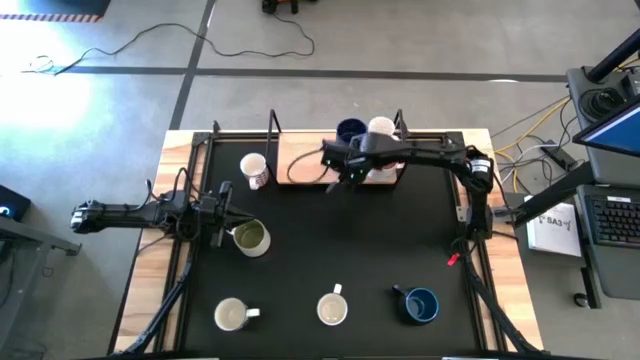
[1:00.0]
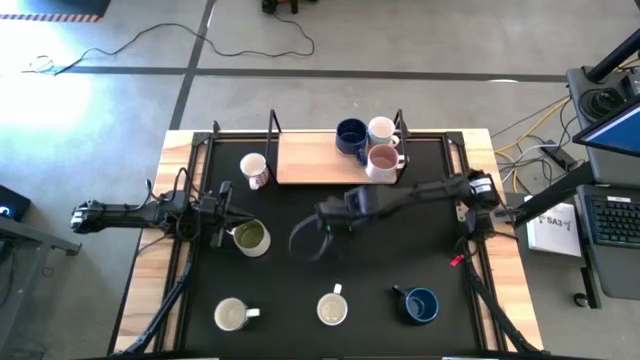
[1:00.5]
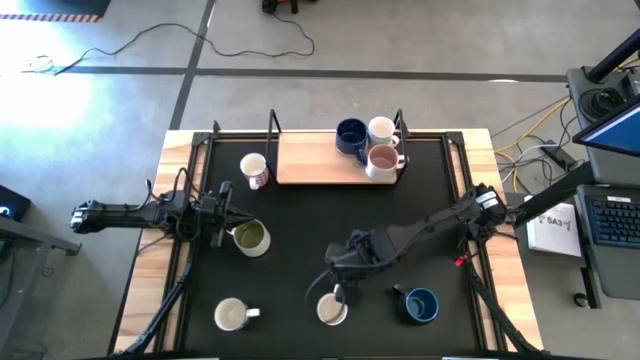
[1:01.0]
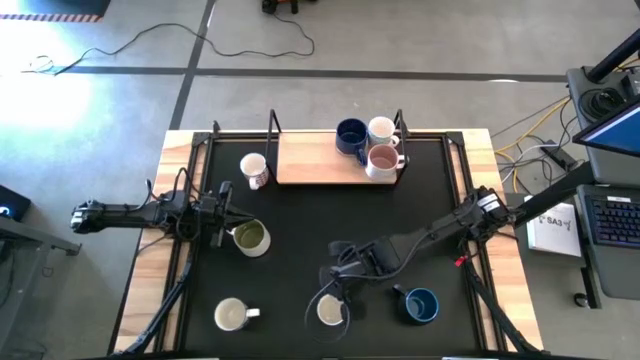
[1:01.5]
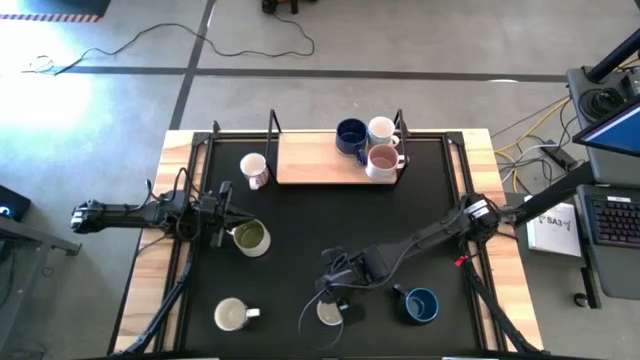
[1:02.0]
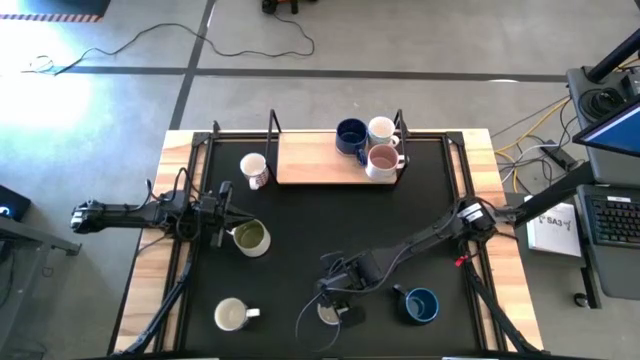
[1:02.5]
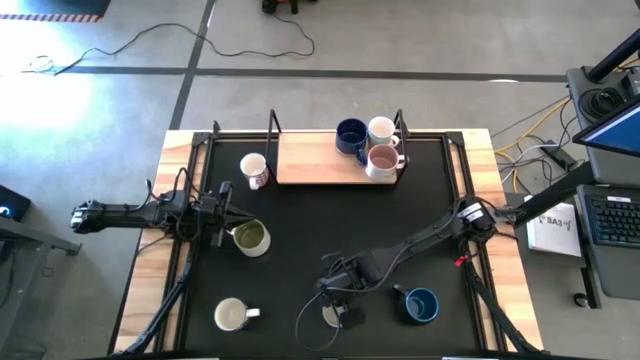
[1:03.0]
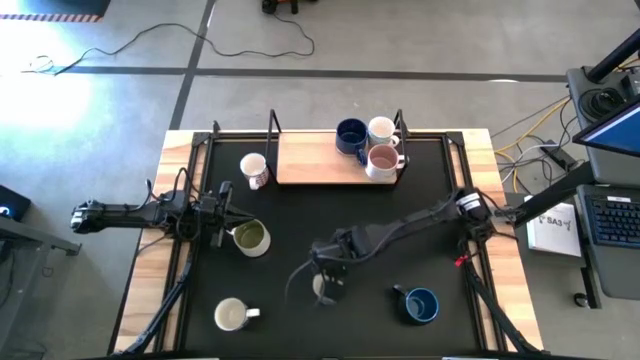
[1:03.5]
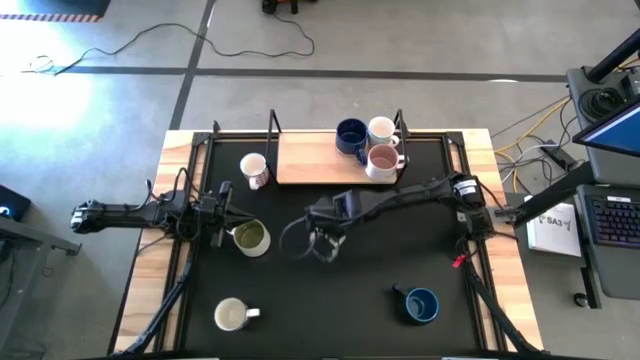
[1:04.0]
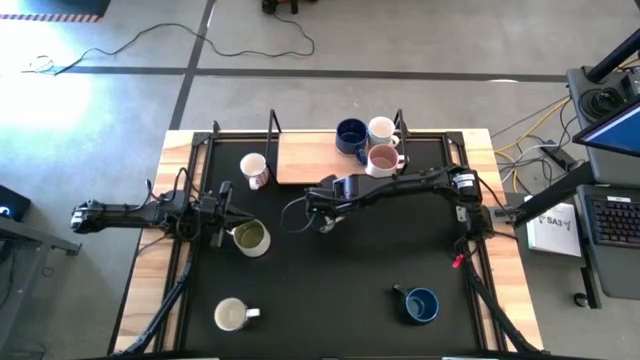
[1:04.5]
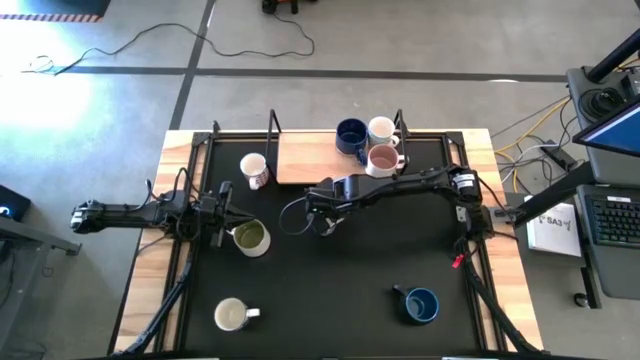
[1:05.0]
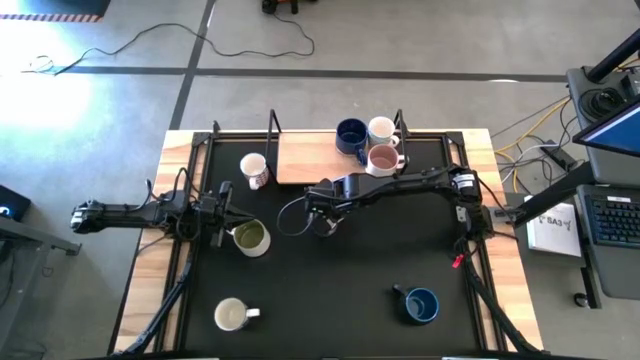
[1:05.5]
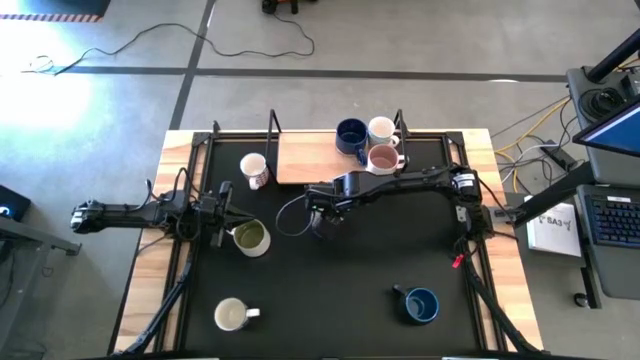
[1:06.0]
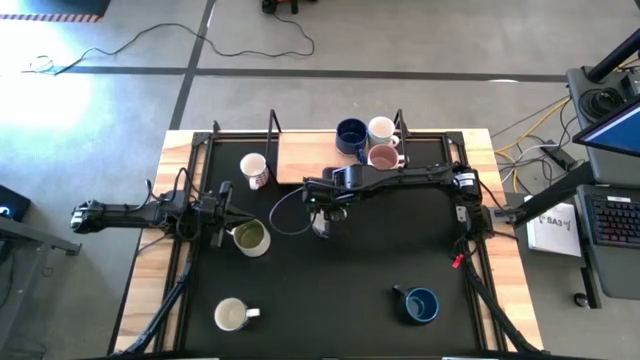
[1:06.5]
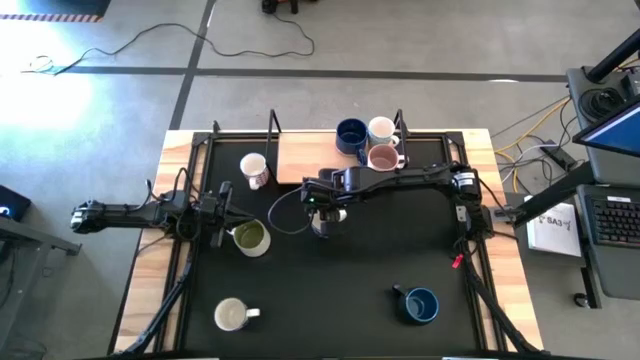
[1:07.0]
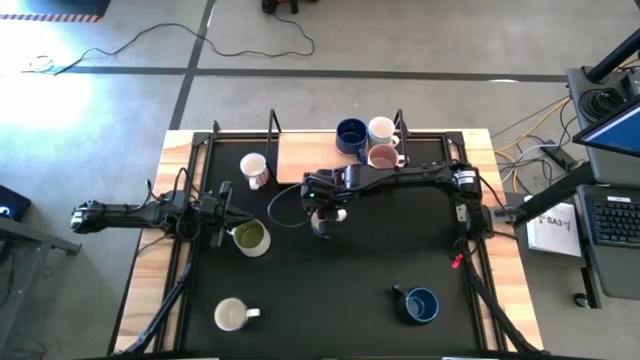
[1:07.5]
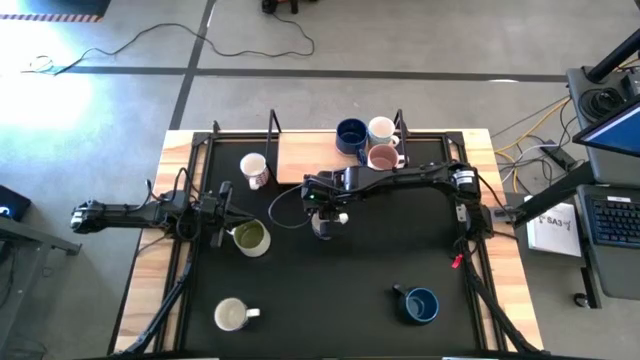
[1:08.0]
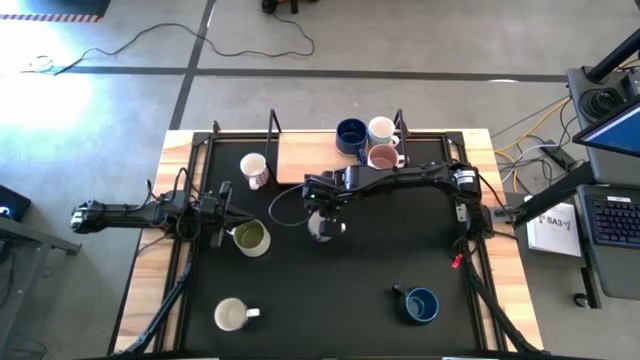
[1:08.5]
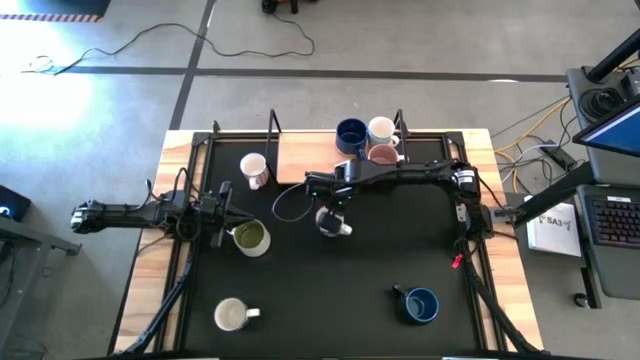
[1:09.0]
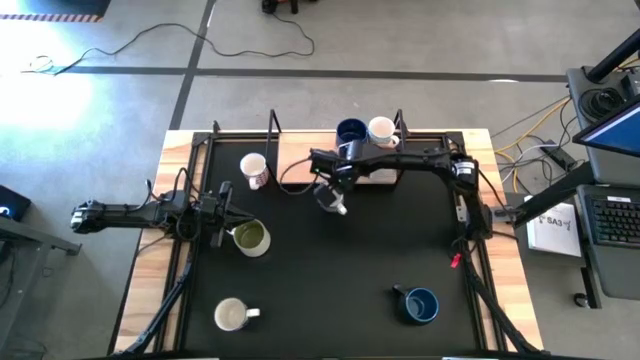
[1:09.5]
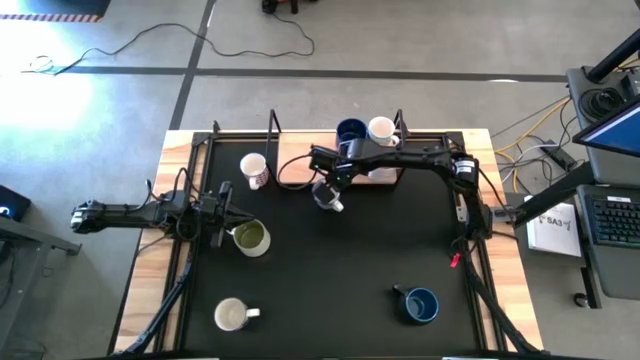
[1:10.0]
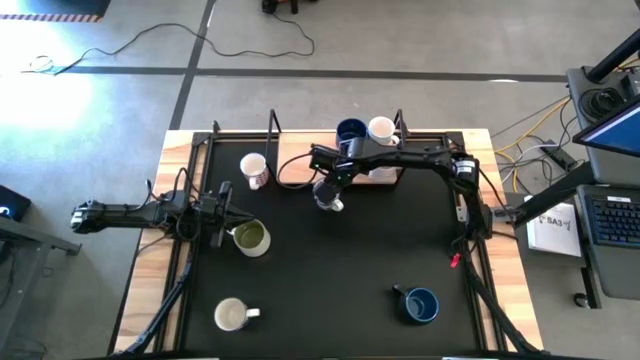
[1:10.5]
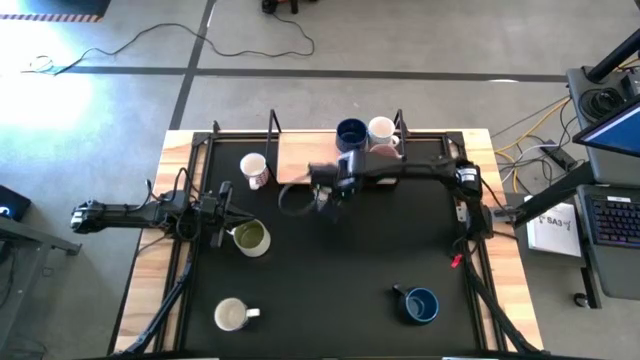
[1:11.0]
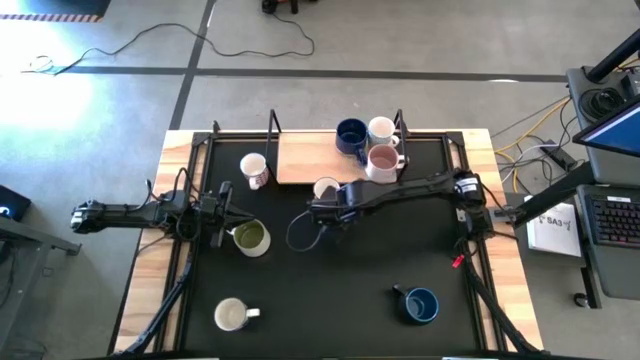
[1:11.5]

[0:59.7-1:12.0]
Task: Place coffee mugs
Put the right blue mug on the shelf aligned with the other dark blue mug

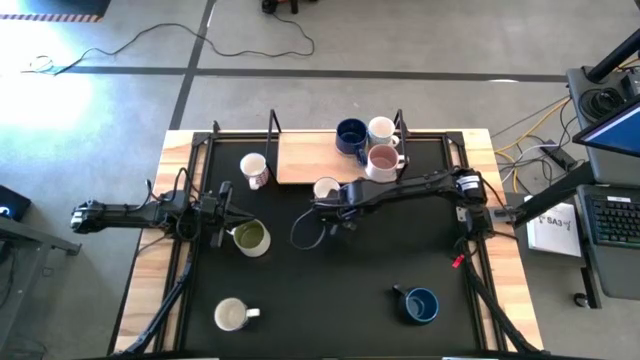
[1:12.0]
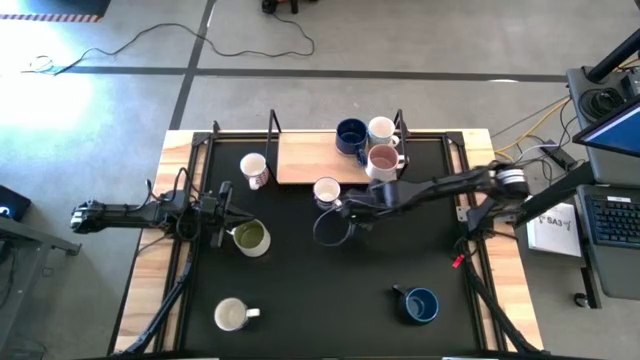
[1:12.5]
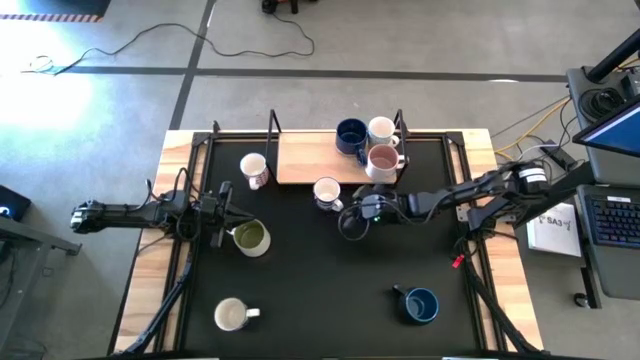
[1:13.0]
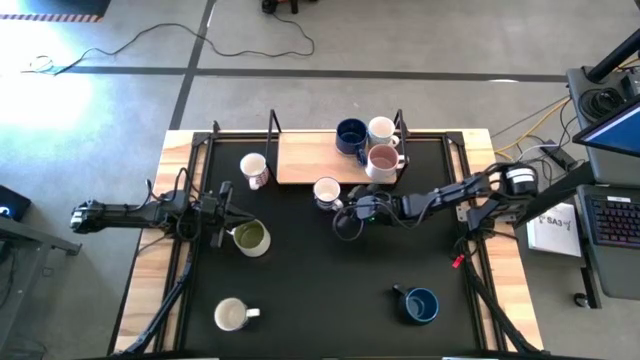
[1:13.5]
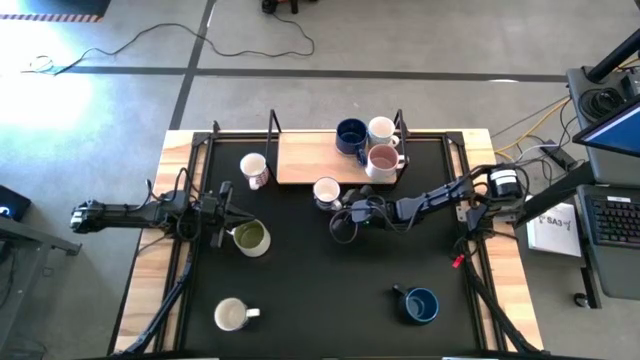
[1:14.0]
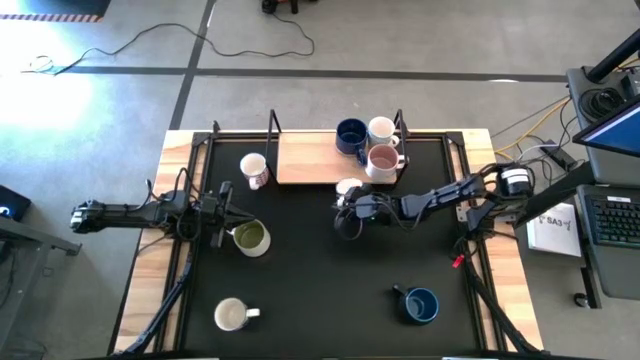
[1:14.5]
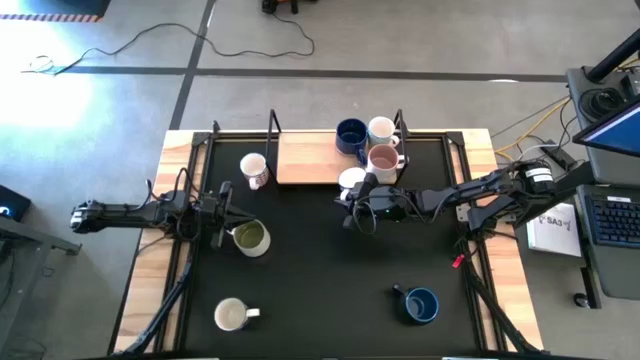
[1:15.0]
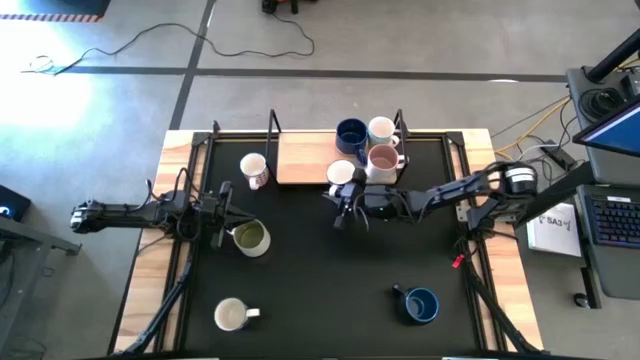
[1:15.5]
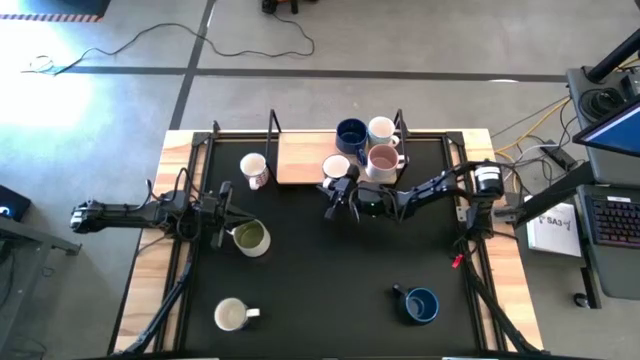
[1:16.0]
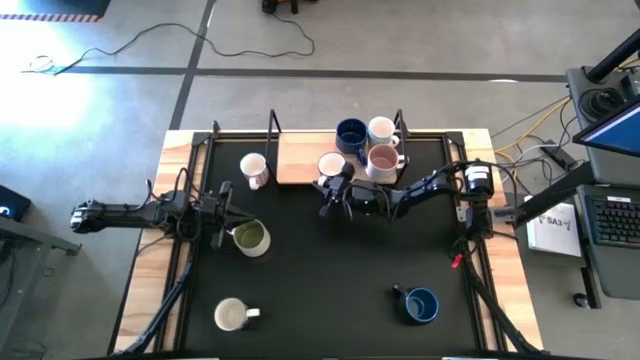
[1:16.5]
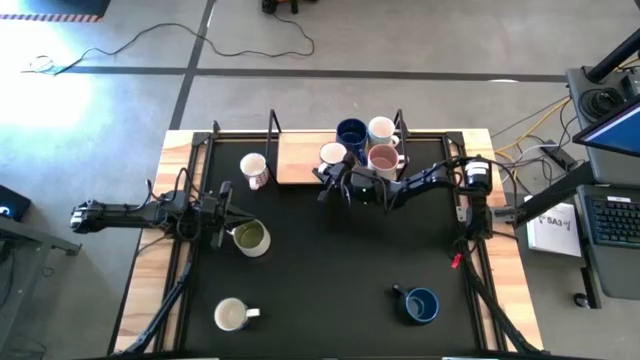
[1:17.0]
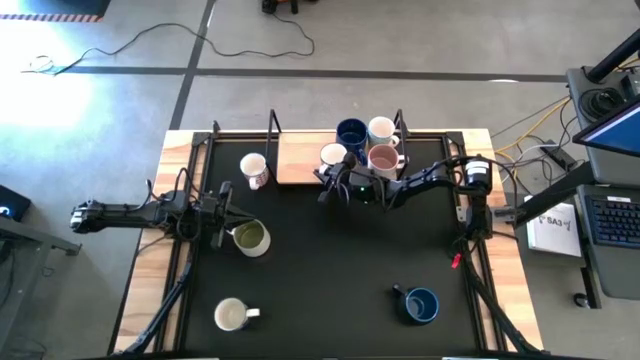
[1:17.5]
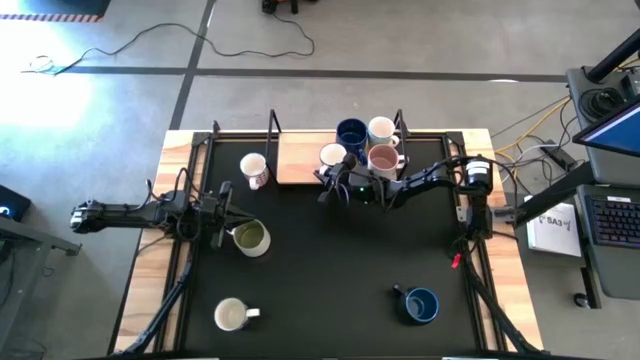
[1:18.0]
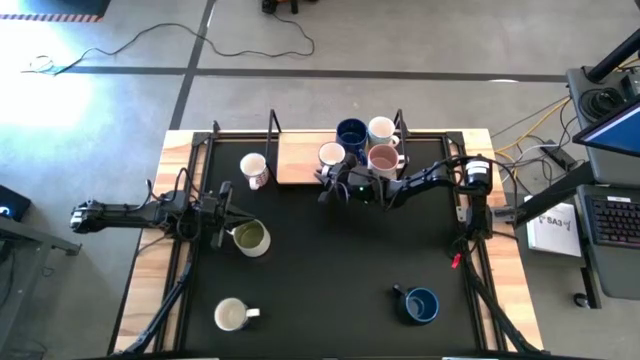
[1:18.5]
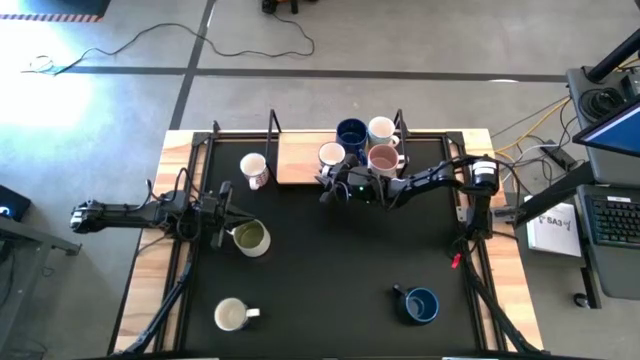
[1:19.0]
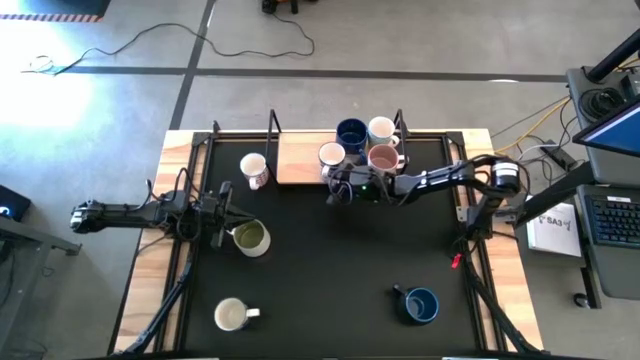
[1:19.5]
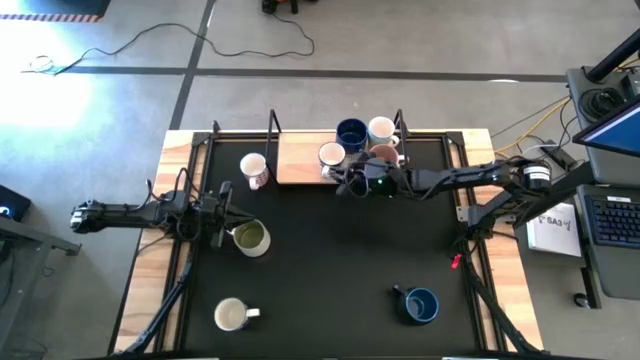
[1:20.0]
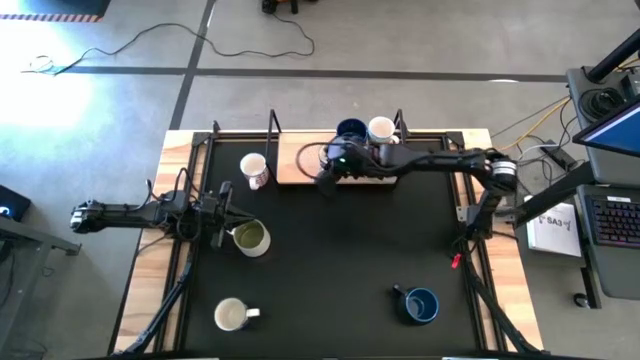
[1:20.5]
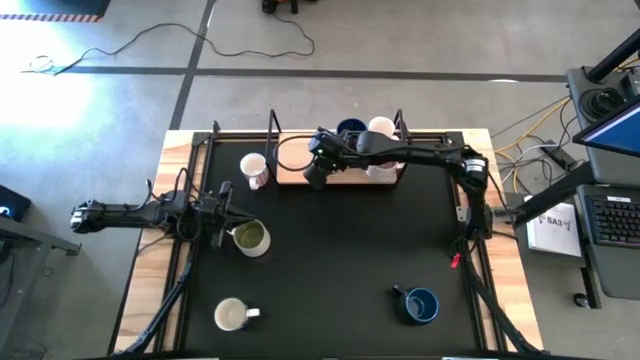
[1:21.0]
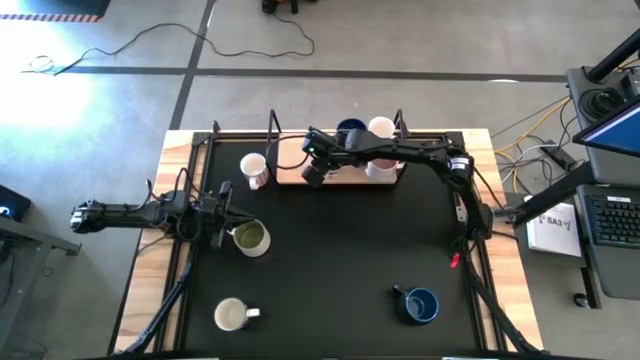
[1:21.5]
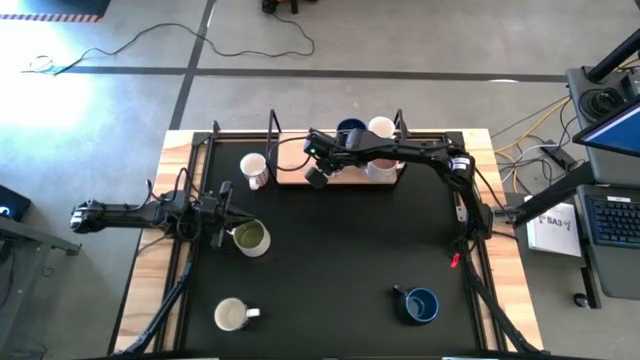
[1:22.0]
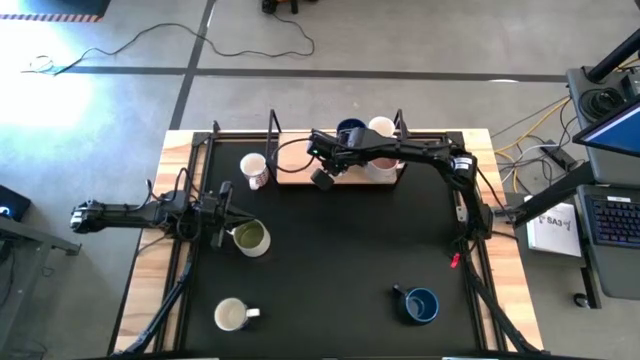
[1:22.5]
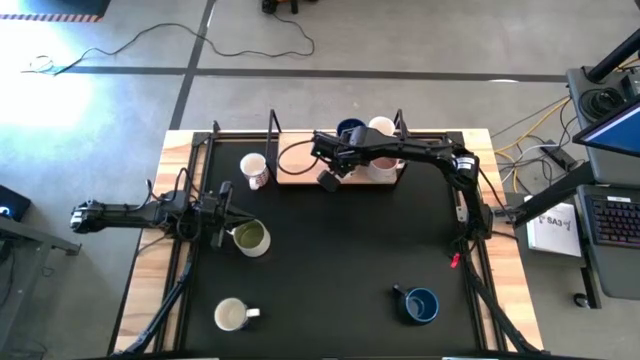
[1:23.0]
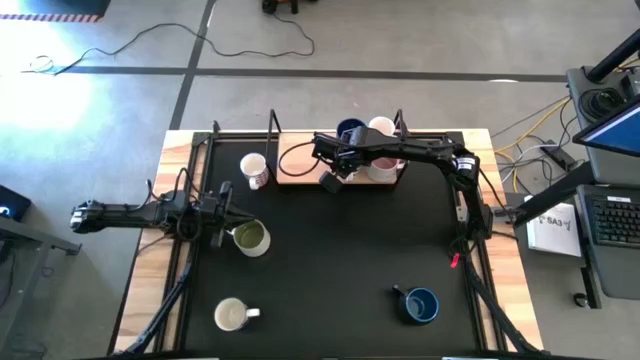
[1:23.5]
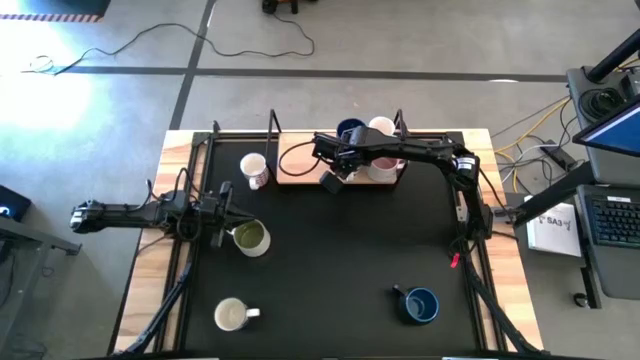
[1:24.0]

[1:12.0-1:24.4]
Put the right blue mug on the shelf aligned with the other dark blue mug
